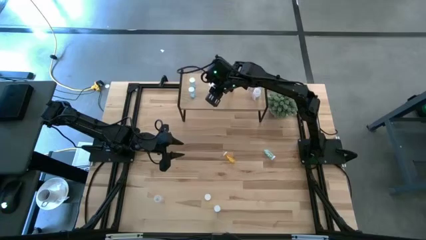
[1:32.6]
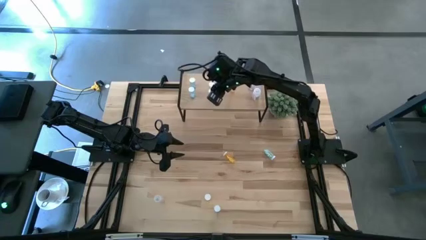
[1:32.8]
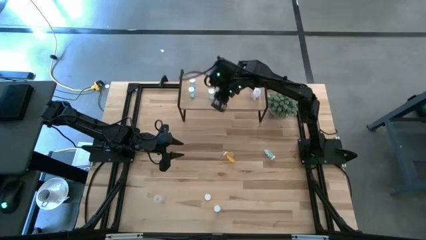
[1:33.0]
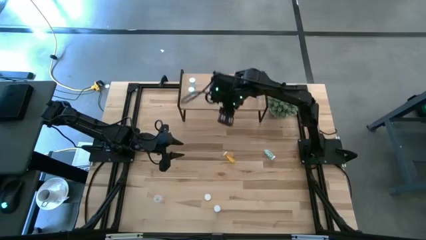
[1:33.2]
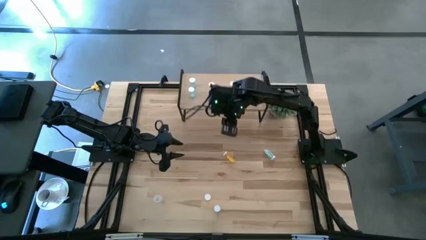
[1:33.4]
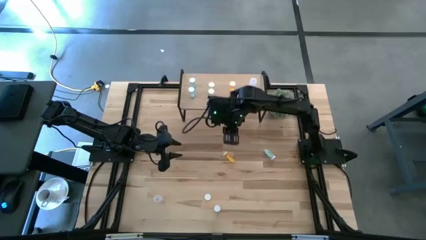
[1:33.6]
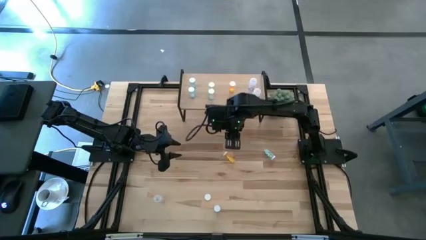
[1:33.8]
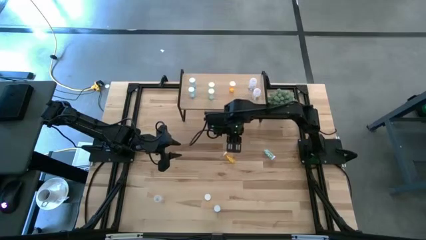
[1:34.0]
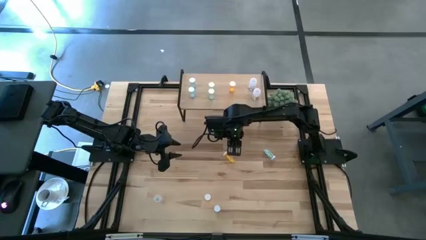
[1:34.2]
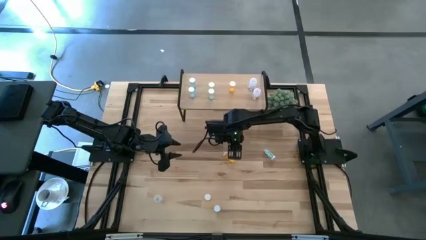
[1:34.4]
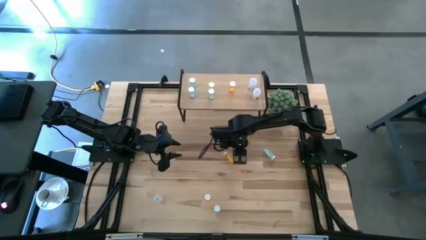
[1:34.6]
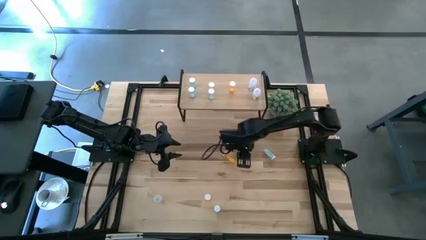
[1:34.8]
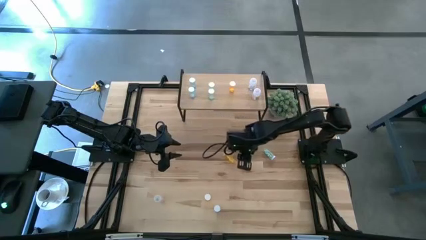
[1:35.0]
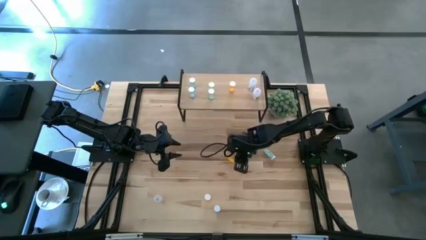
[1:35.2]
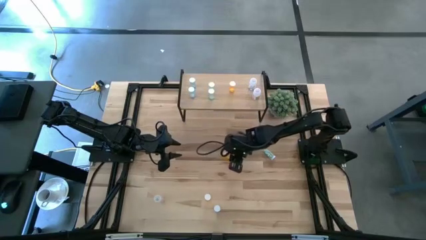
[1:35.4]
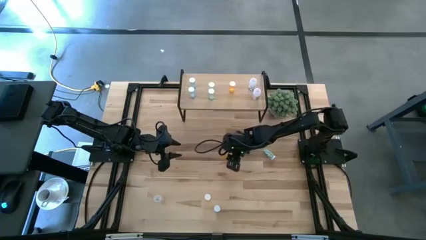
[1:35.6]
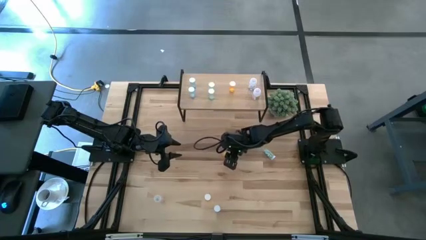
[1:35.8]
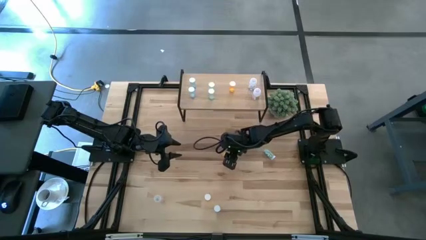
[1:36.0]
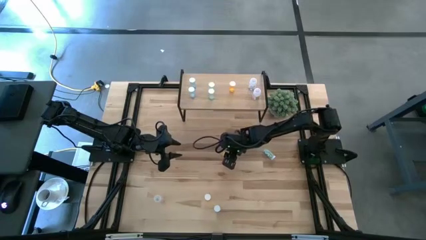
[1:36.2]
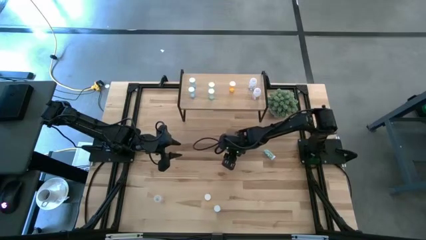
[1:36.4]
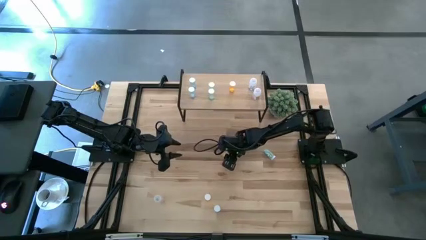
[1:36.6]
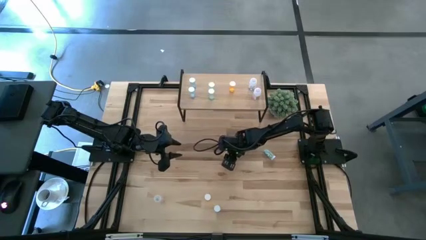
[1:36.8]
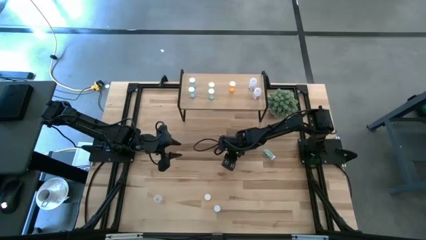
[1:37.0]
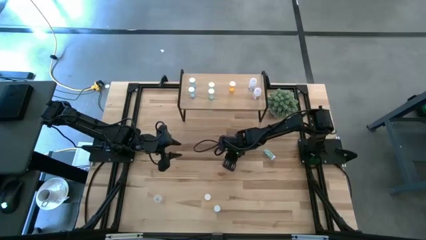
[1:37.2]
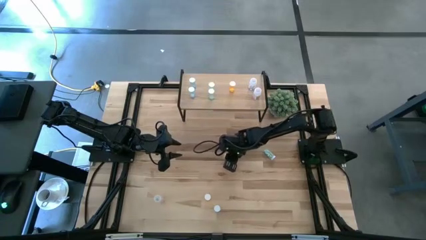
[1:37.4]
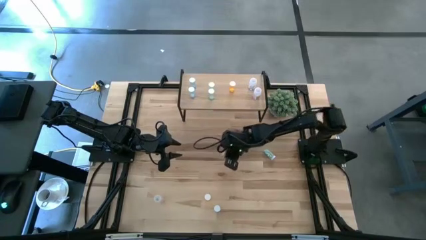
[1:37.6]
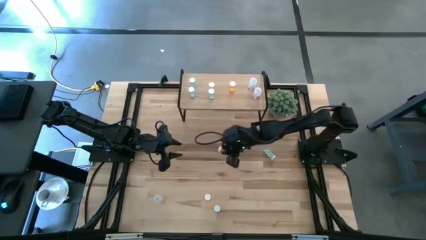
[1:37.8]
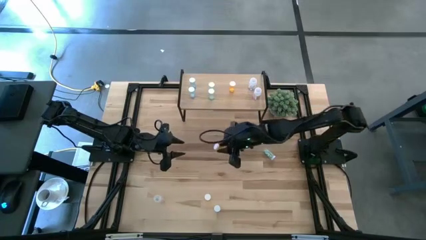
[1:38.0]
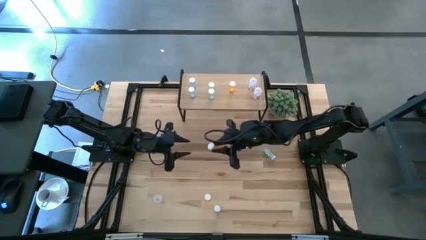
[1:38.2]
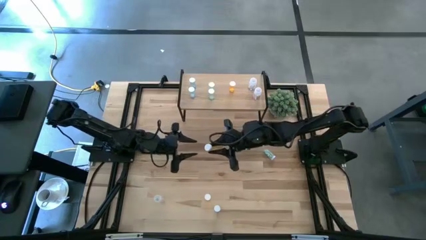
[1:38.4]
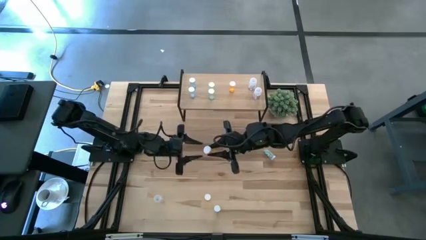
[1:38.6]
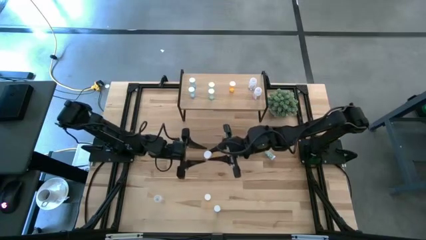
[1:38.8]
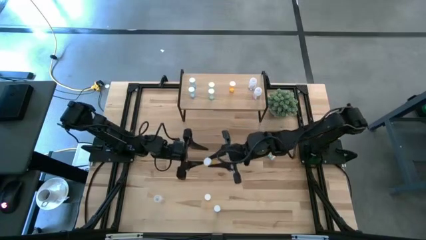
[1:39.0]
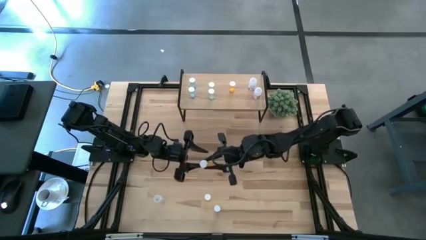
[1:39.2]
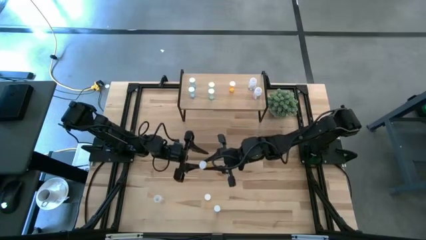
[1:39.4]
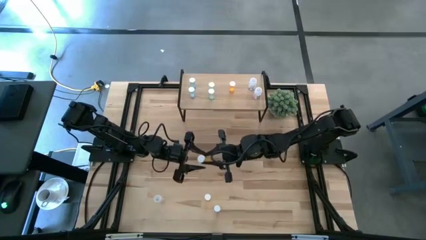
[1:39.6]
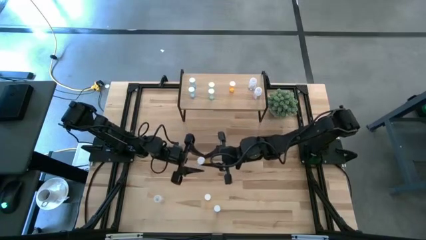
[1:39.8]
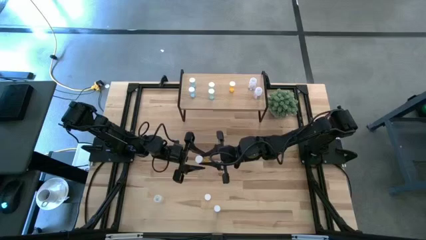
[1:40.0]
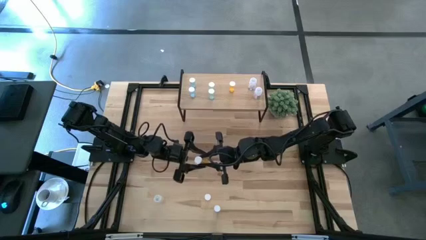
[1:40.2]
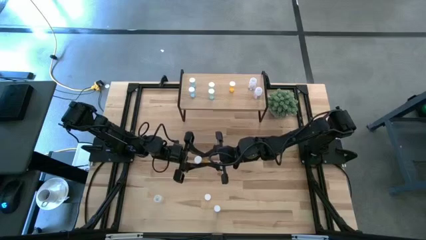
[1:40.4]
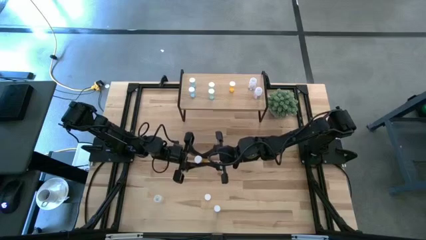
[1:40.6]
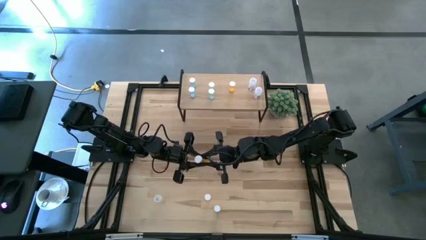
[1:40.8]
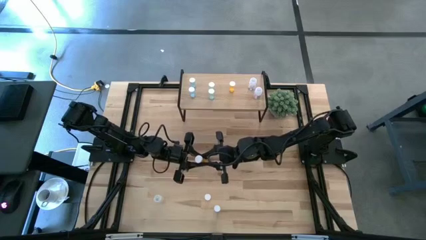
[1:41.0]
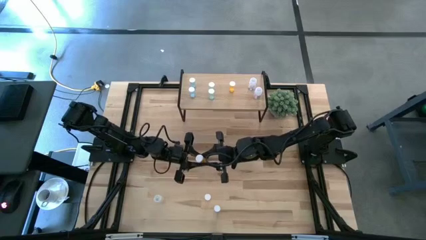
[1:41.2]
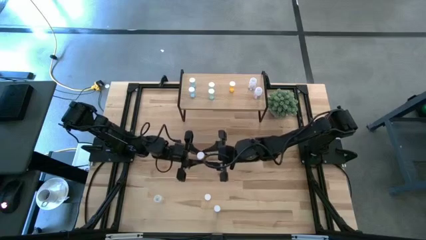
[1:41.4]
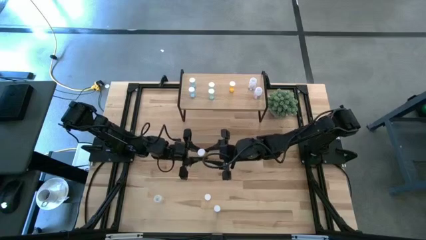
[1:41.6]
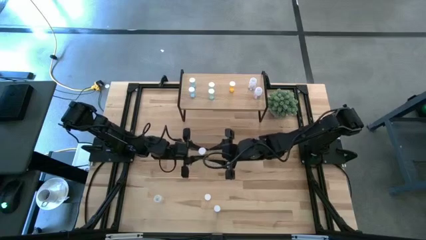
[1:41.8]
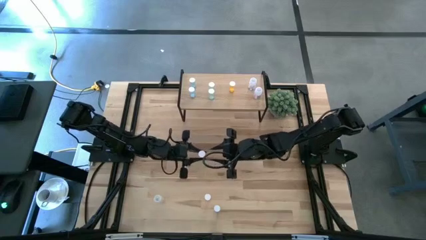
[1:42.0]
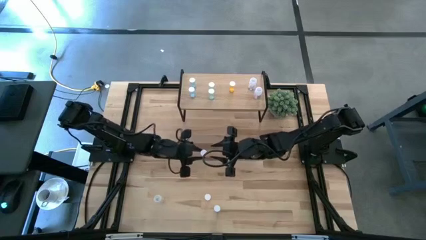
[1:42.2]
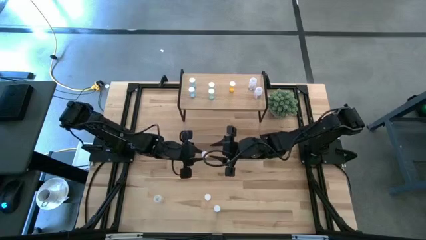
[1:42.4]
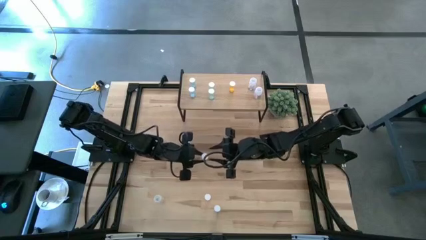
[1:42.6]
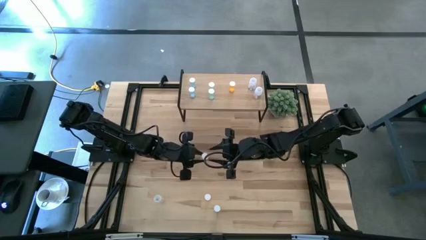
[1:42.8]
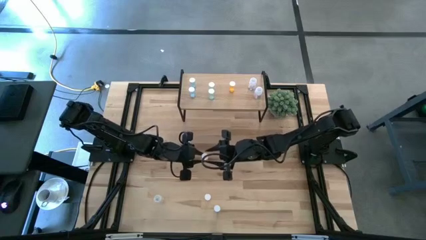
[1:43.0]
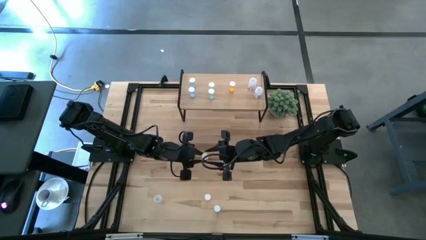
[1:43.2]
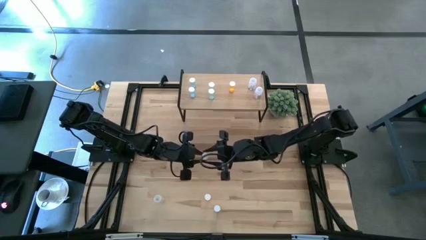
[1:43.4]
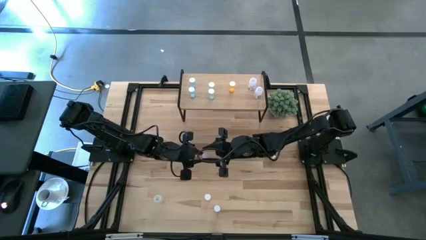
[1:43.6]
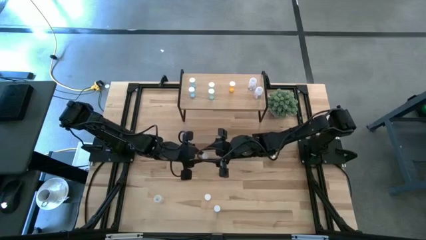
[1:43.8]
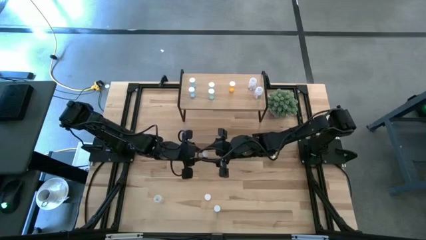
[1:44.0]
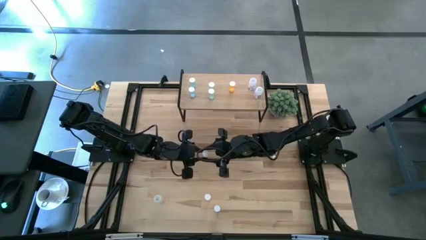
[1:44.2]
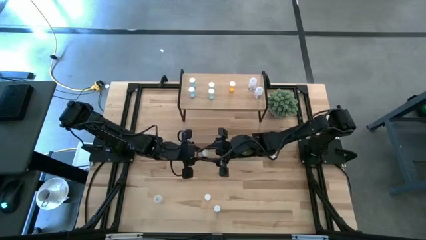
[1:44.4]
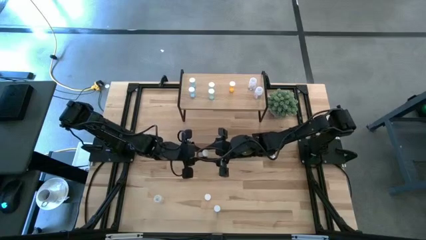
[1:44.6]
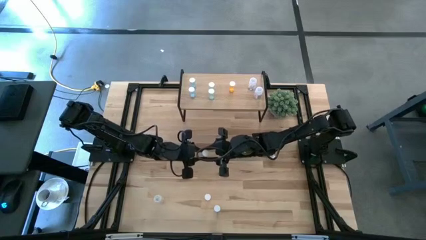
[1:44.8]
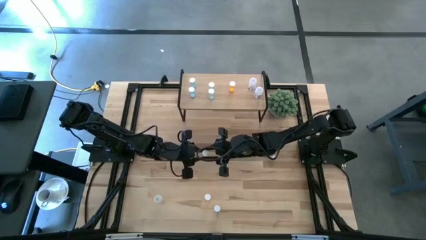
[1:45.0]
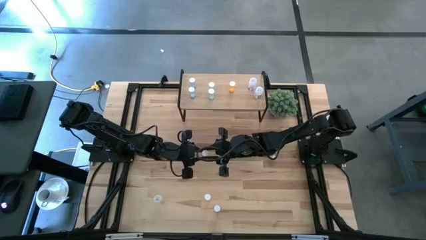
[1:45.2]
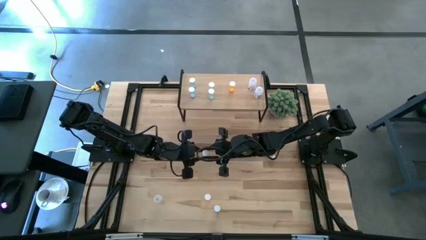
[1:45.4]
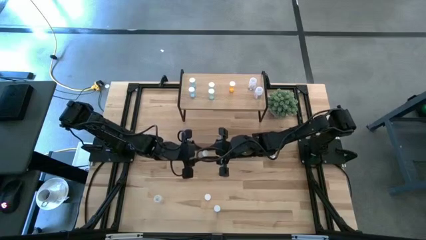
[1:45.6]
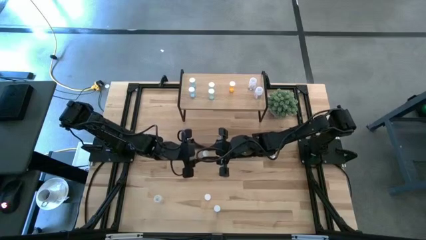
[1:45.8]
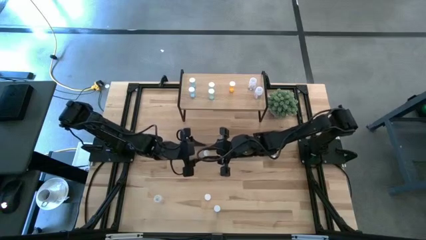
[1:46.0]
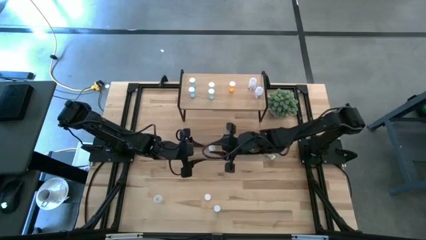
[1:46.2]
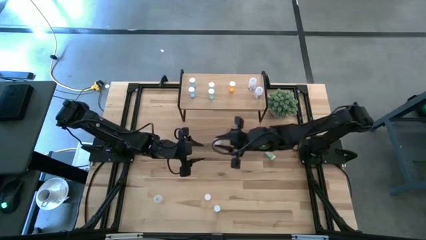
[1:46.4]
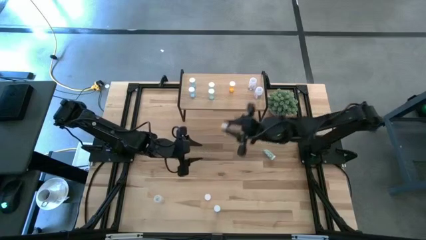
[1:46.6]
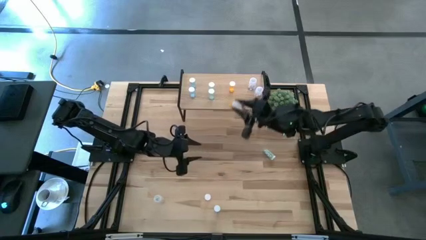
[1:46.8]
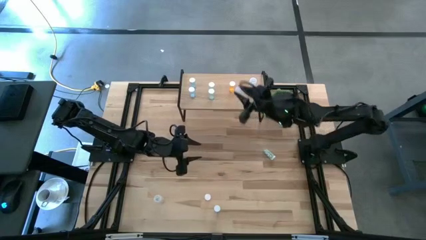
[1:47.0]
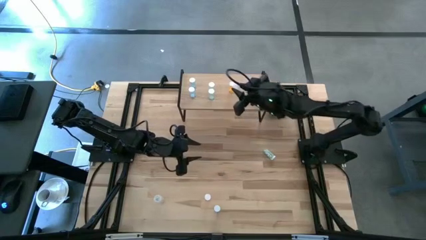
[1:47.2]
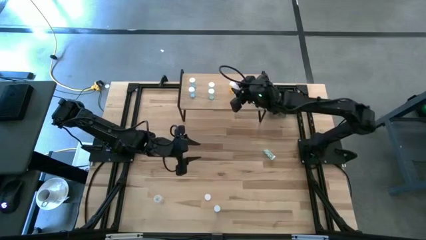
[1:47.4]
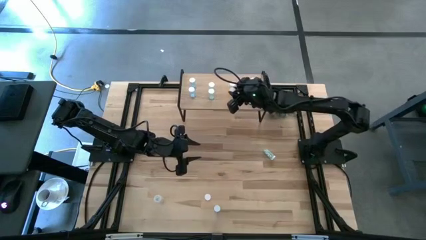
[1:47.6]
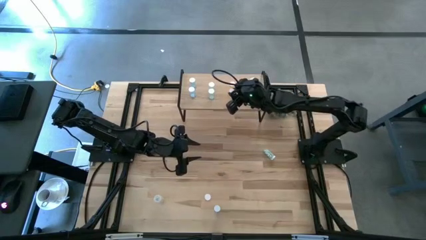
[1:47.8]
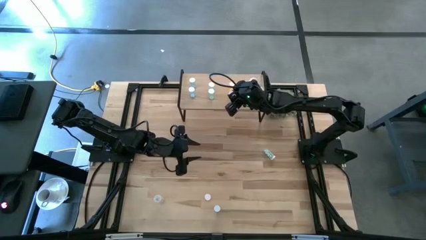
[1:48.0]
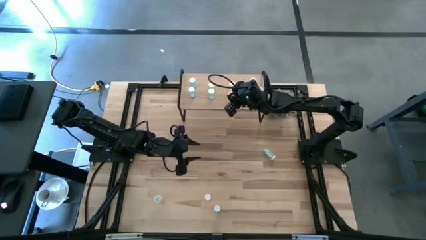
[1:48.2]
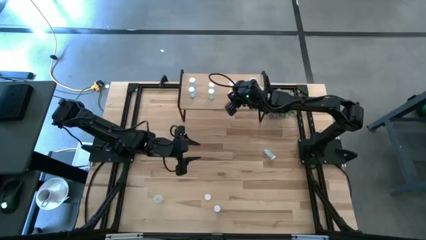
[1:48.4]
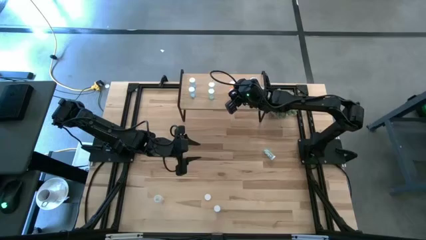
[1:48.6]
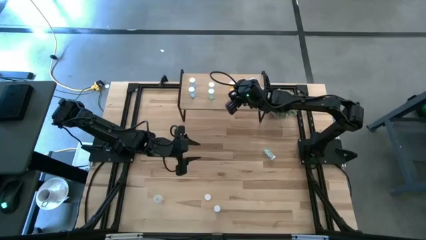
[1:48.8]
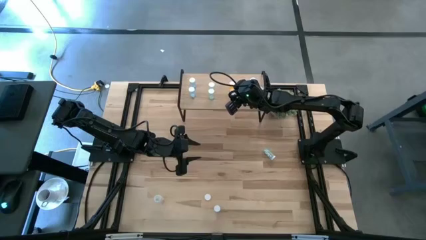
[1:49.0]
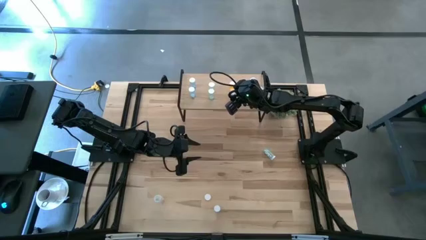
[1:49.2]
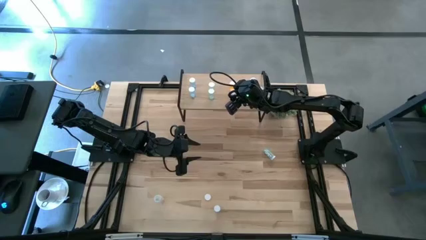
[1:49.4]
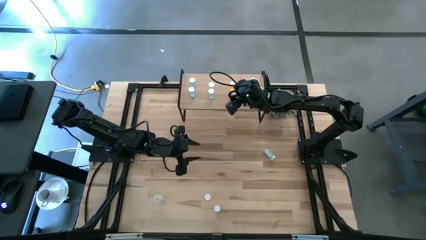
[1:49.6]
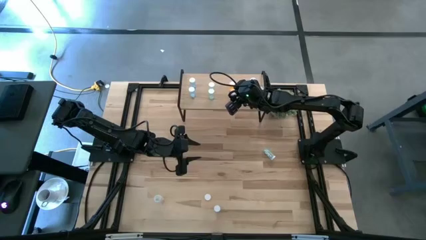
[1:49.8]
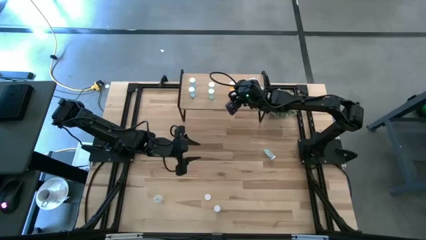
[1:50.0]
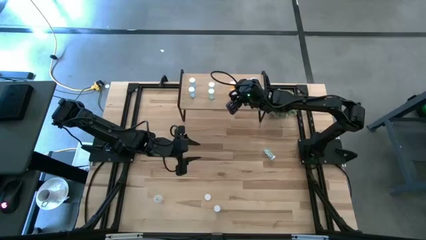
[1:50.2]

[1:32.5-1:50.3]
Task: Pick and place medicine bottles onto shelf by color
Put the top orange pill bottle on the shelf aligned with the other orange pill bottle
